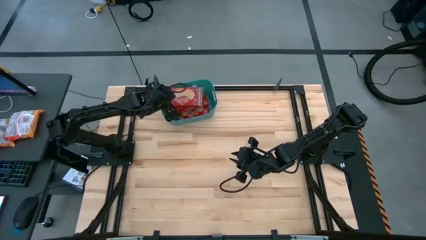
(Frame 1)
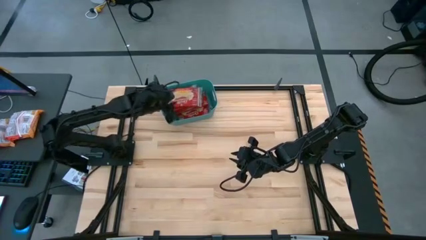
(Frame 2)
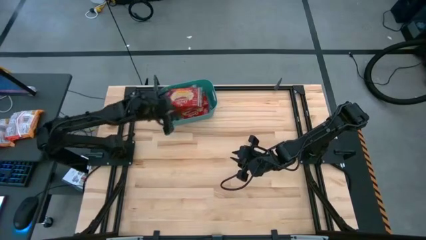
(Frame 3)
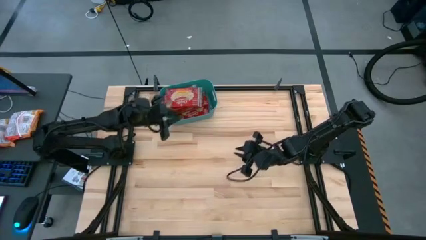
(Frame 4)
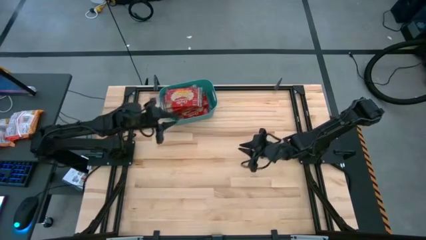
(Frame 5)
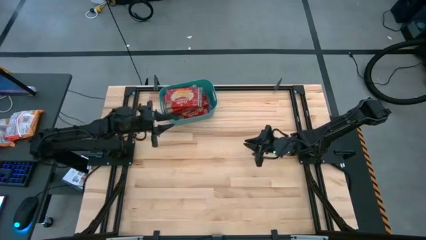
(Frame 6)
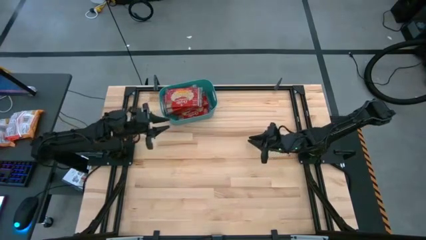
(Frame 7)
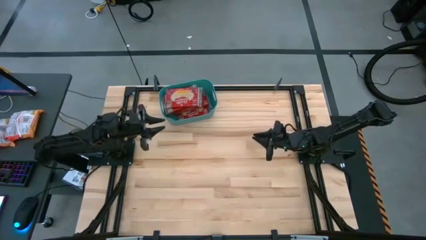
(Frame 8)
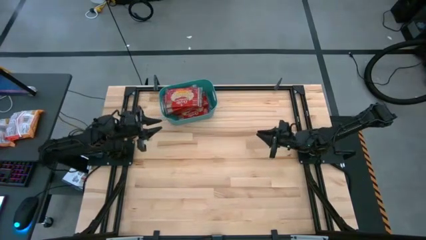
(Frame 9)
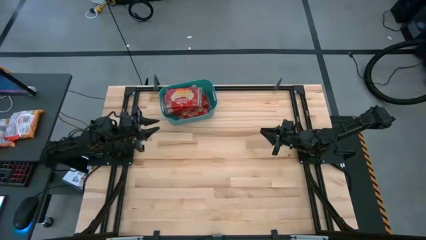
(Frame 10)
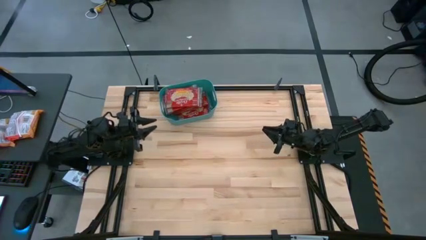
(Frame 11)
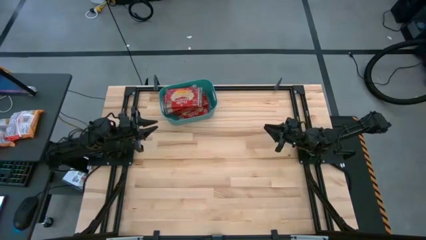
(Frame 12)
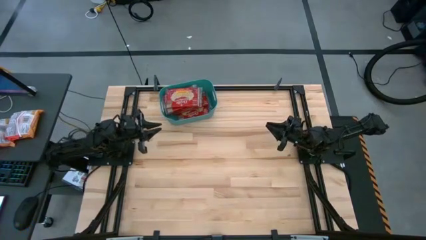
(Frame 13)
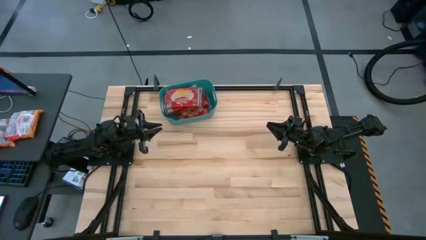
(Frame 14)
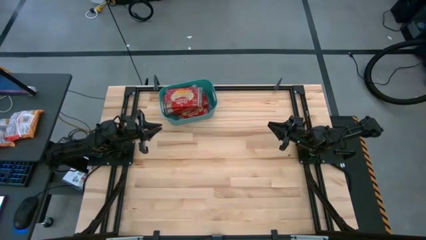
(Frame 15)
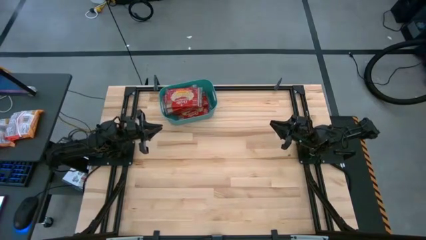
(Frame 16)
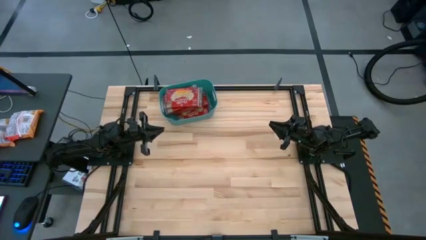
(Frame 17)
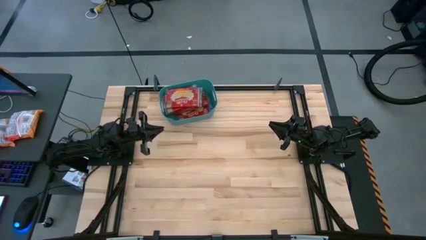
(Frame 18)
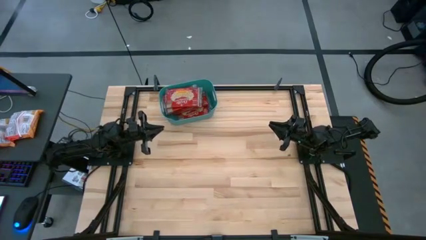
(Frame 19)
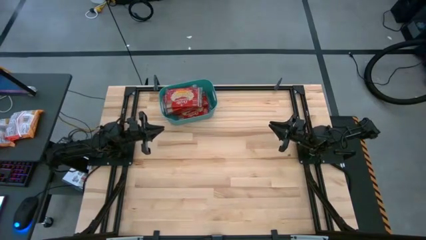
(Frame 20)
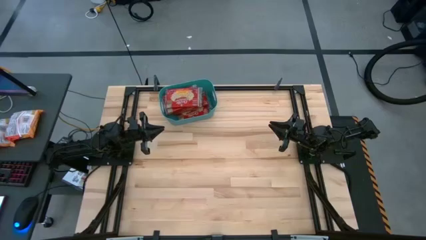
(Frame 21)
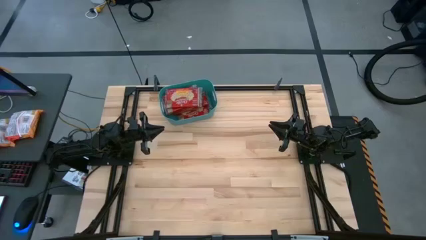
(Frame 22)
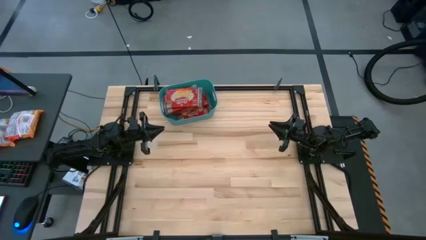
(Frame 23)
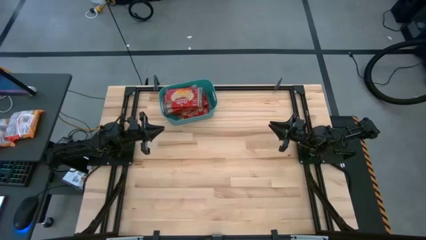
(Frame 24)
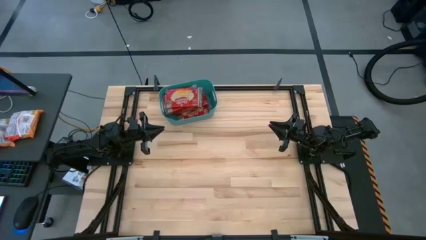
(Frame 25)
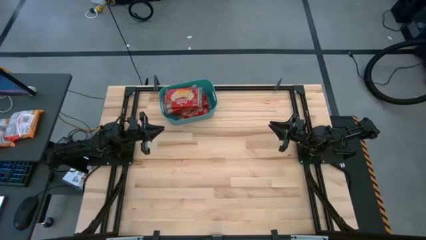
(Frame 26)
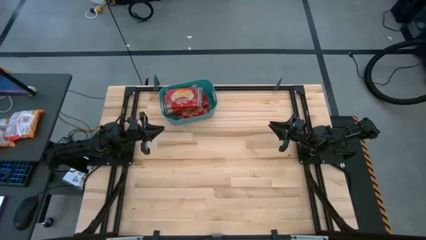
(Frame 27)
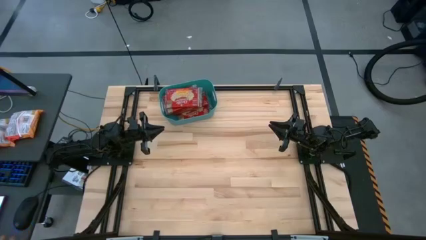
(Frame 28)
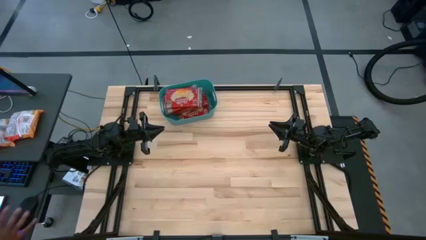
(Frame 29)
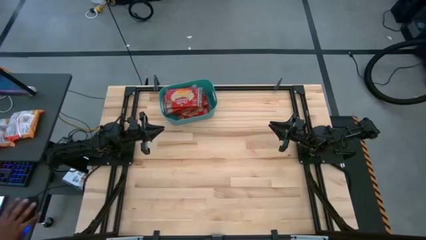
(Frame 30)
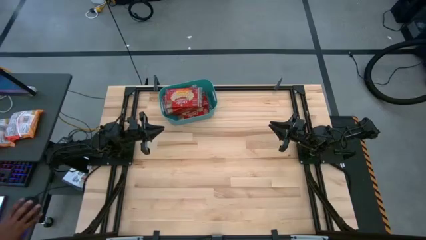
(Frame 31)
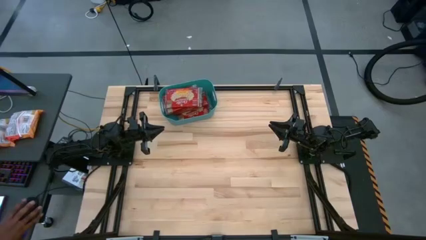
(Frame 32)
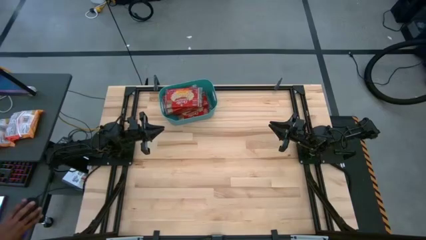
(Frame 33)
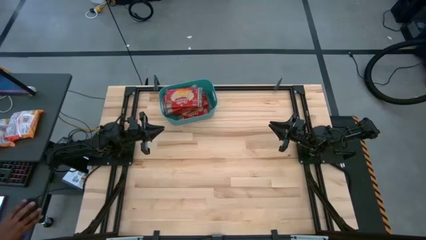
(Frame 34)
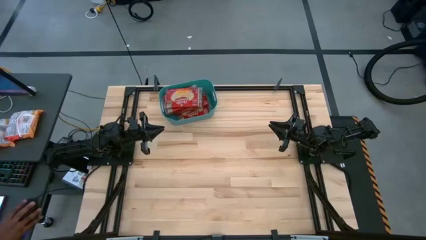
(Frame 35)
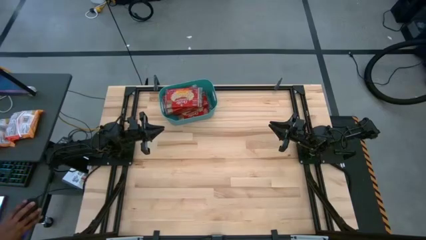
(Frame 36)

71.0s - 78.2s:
Task: Sort popcorn bags into baskets
Return to Home Position

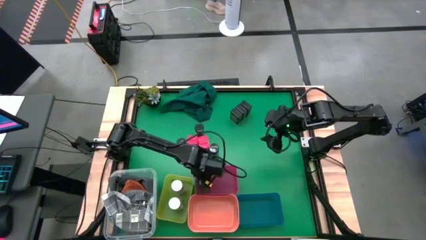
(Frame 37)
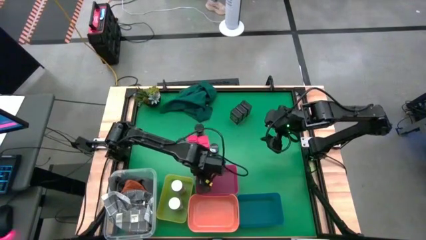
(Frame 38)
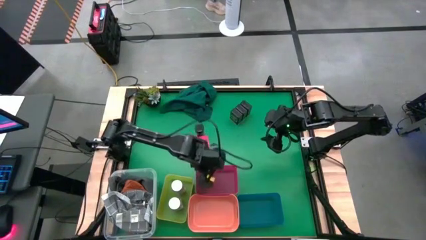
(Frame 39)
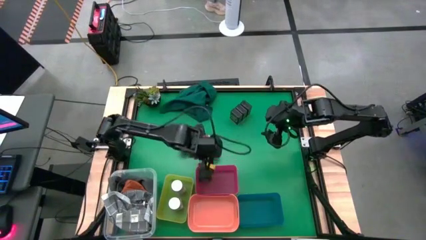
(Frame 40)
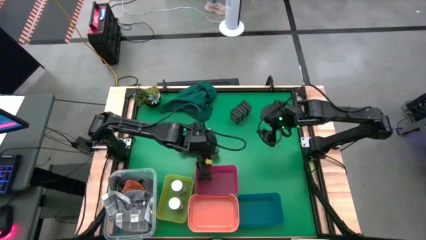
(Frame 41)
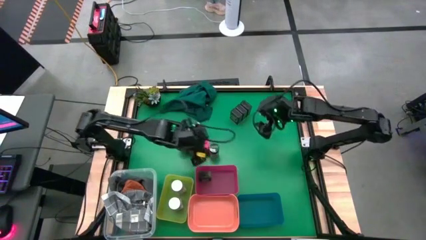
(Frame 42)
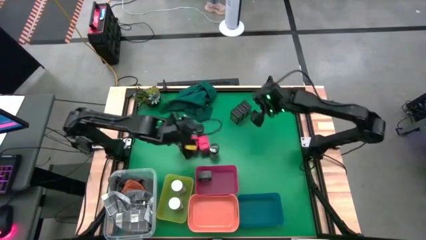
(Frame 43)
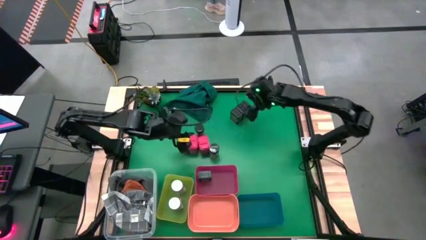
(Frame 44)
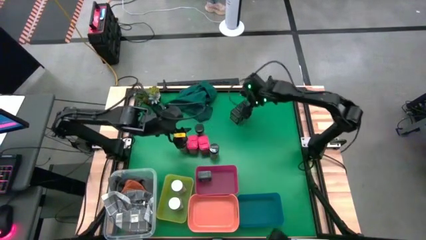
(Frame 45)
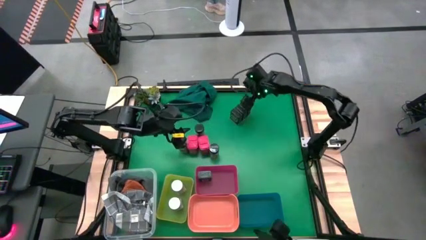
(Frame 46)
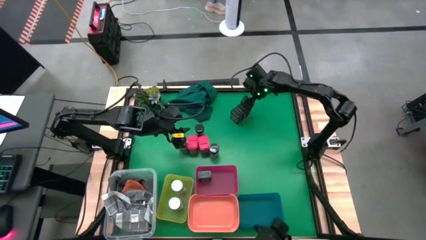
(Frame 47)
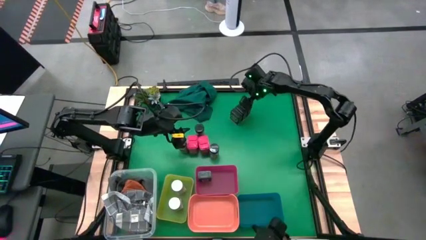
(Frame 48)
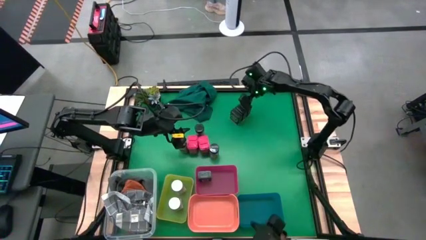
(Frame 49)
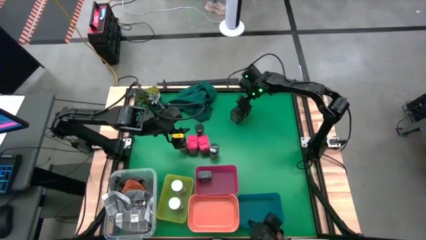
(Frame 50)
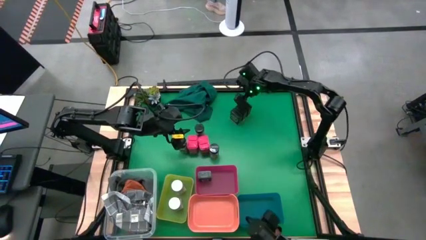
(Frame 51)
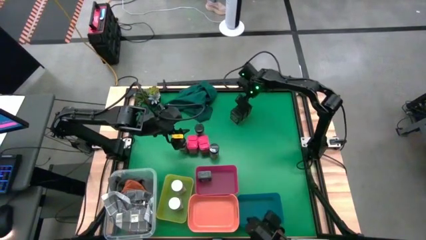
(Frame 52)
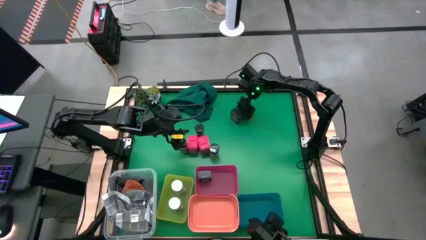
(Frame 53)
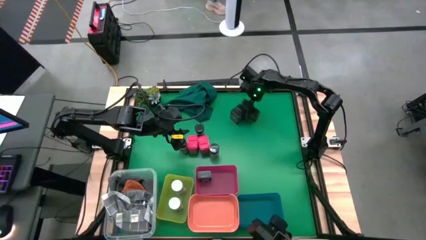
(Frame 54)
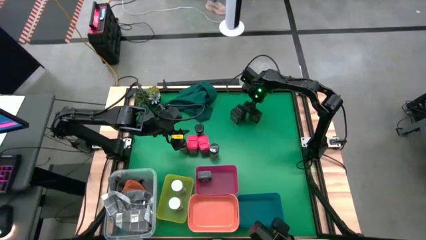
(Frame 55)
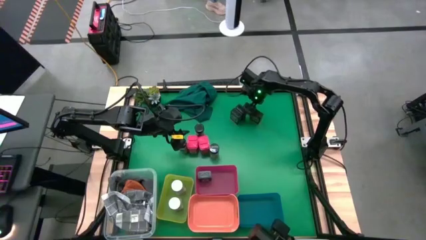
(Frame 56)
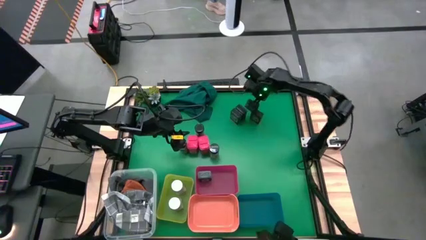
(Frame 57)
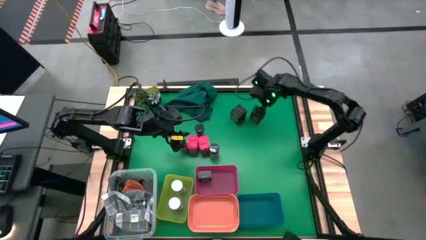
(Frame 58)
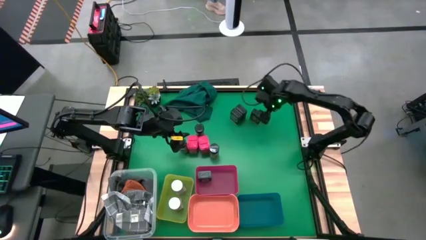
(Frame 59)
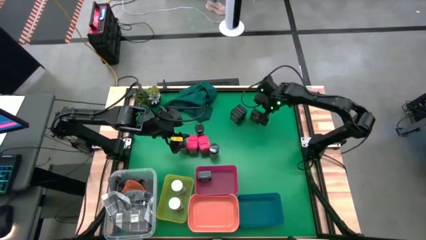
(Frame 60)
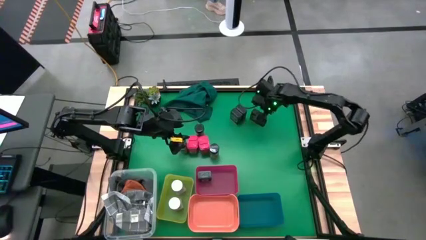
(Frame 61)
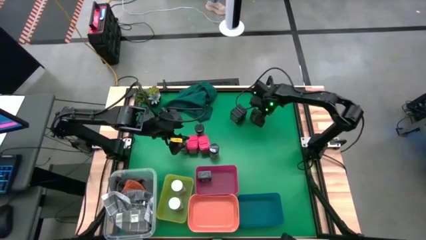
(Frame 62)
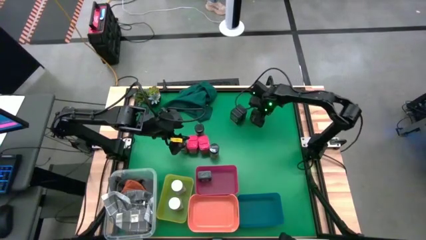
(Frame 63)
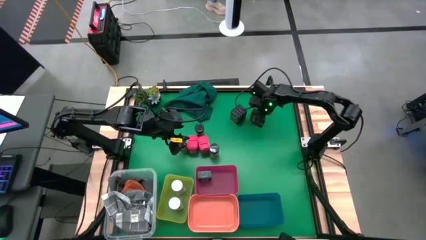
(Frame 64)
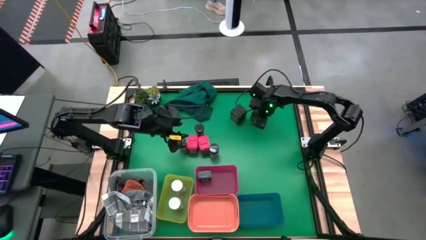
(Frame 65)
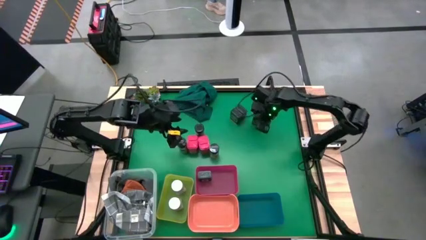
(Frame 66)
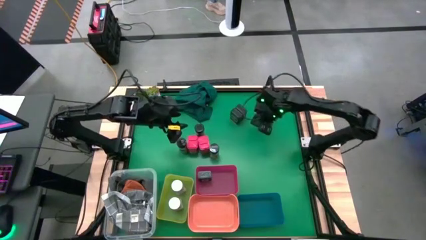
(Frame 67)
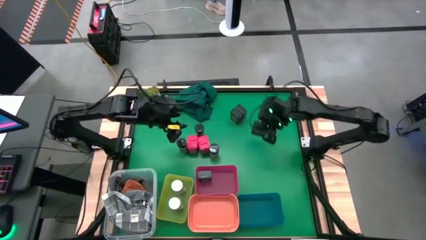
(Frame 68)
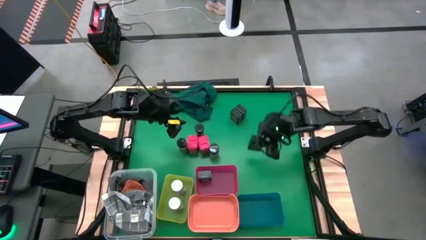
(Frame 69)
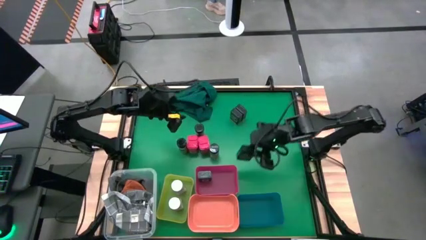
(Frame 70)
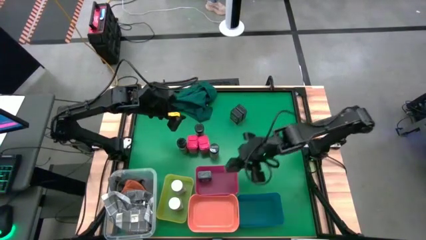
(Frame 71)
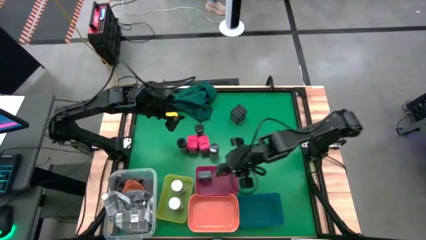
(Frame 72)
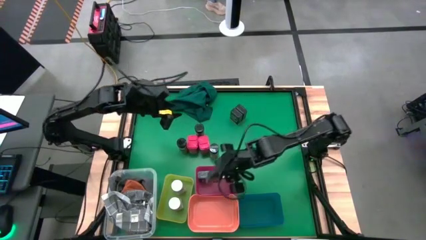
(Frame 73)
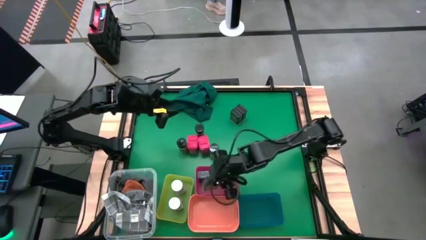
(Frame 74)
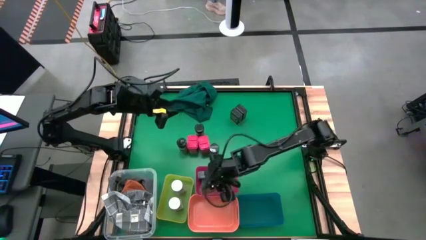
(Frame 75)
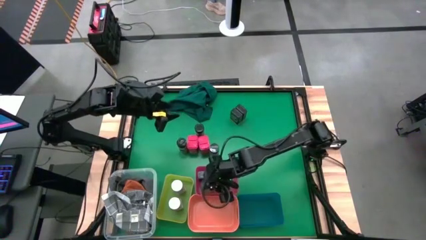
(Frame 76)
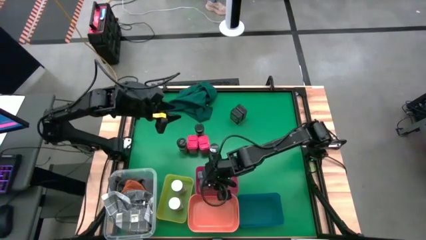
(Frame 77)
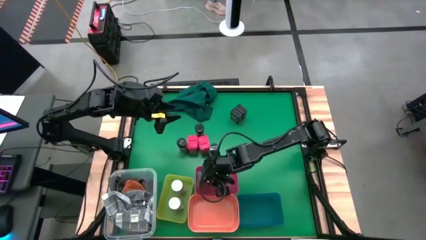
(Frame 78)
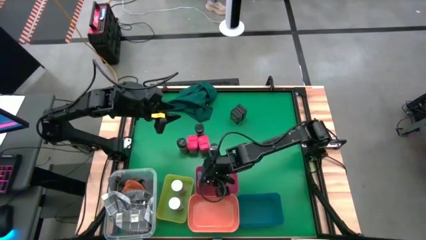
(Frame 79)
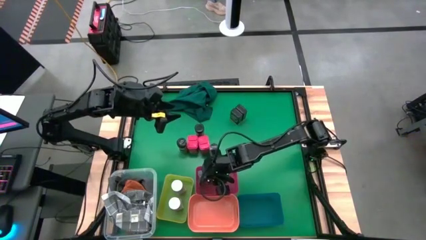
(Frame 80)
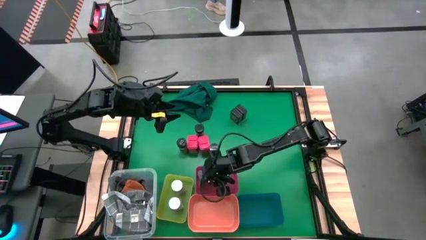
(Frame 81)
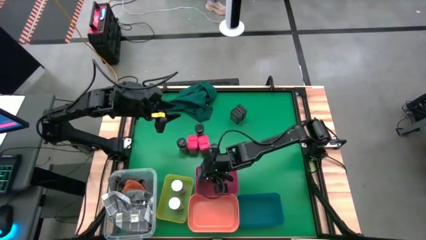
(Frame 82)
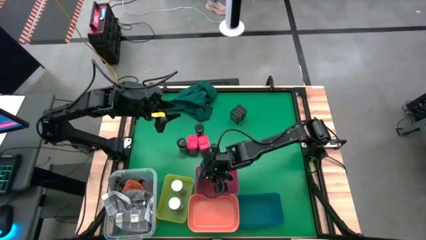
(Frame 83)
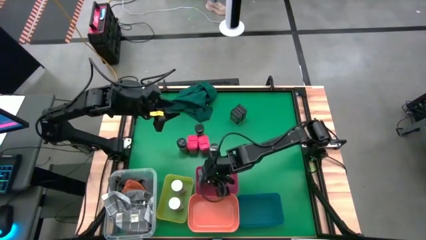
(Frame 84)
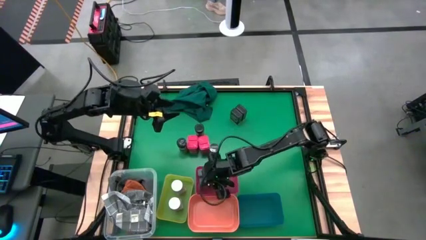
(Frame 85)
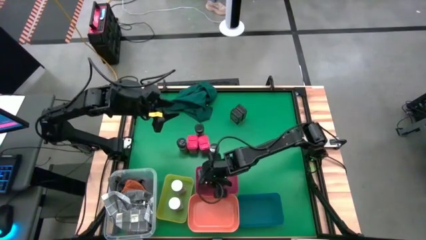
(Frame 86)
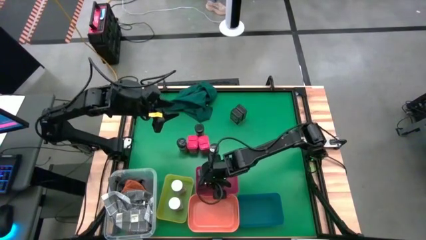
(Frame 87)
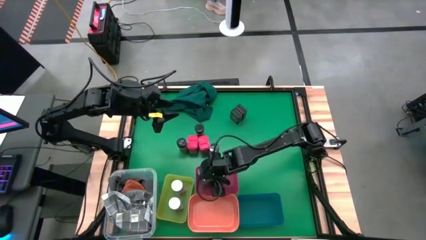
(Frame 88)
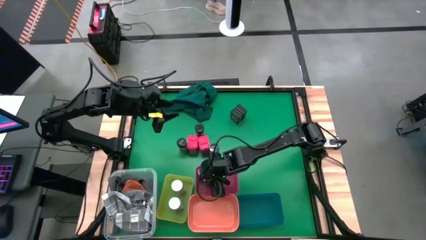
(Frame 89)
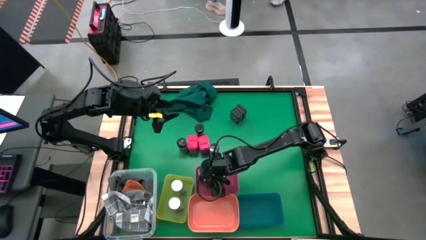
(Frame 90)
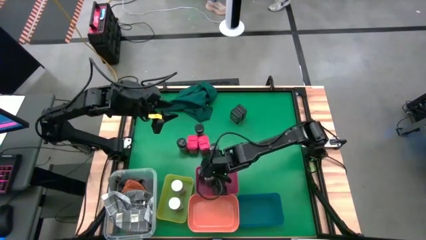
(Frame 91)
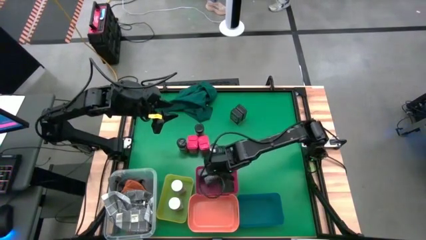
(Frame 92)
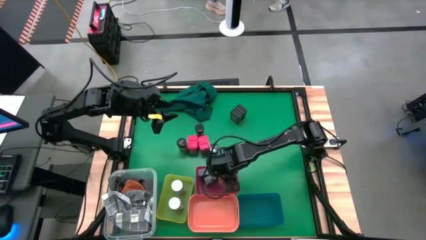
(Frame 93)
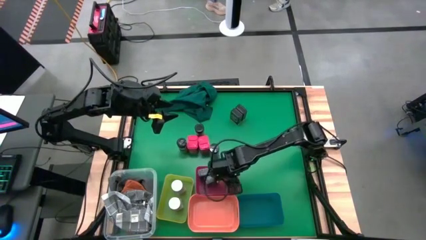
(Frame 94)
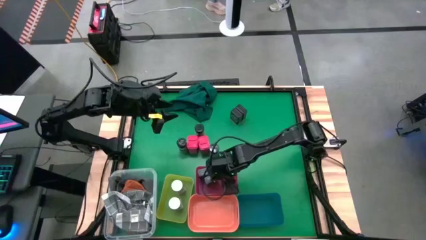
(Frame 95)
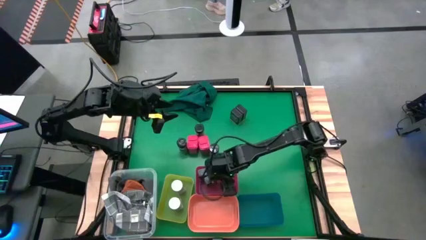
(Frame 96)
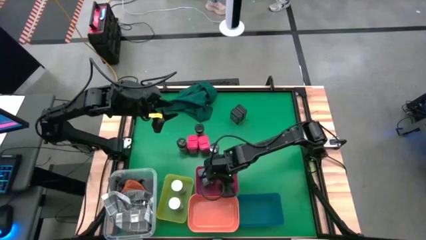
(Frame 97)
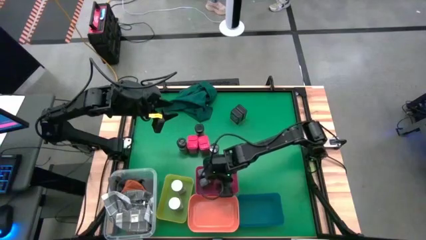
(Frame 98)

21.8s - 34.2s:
Task: Sort spices by type
Put the top black seasoning can into the pink bin
